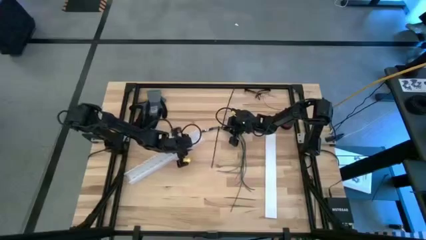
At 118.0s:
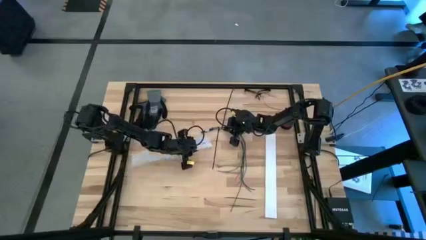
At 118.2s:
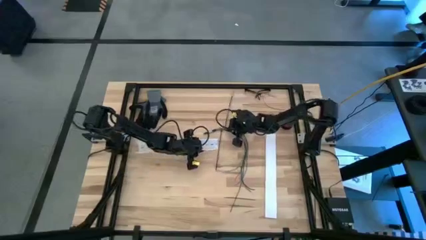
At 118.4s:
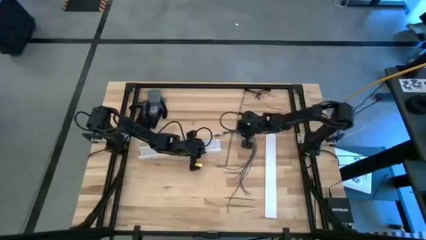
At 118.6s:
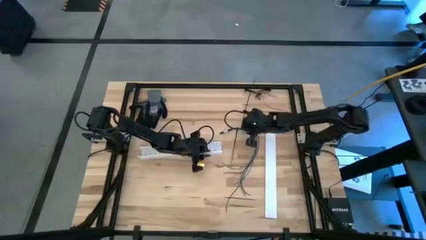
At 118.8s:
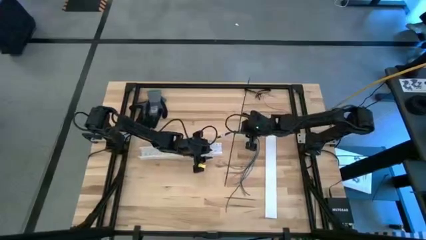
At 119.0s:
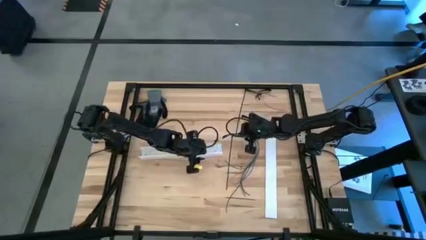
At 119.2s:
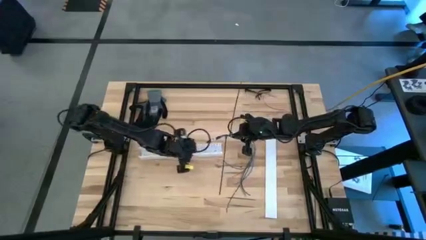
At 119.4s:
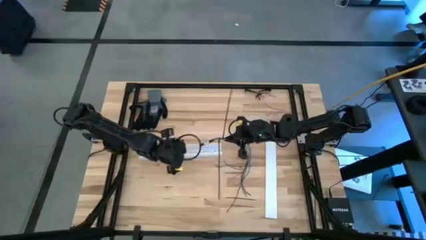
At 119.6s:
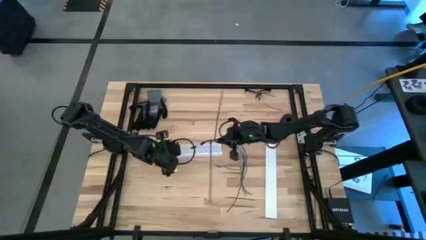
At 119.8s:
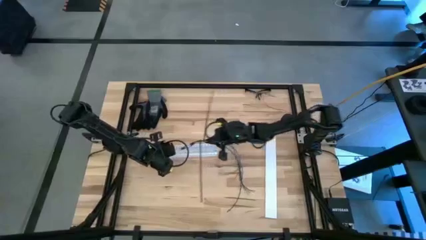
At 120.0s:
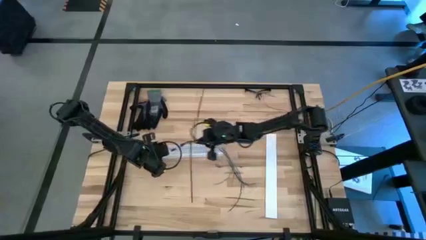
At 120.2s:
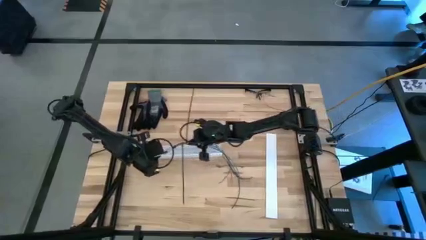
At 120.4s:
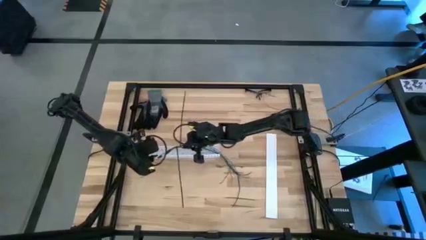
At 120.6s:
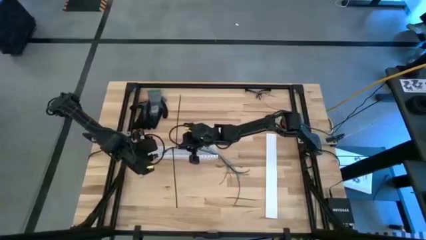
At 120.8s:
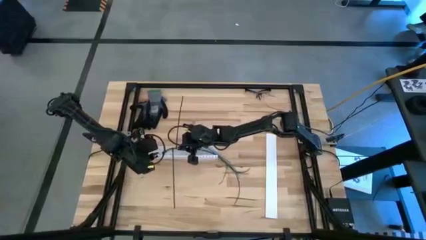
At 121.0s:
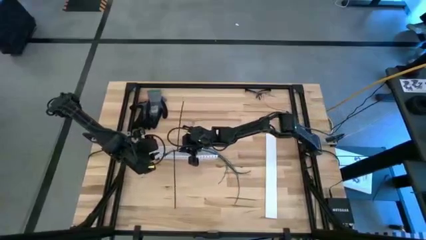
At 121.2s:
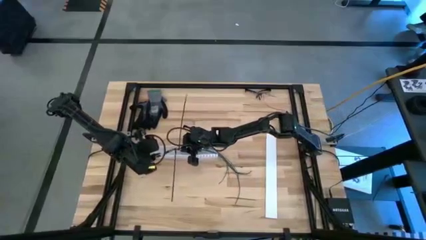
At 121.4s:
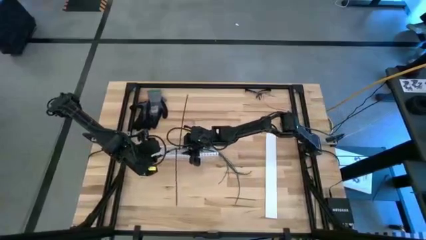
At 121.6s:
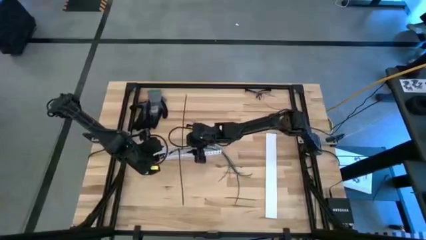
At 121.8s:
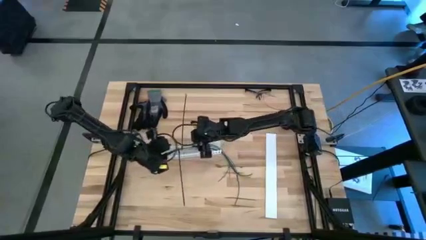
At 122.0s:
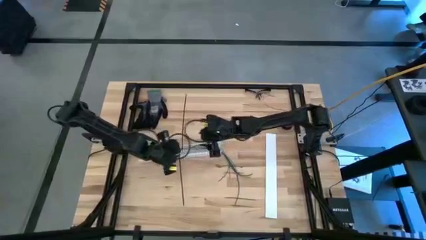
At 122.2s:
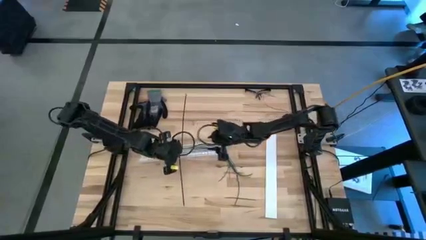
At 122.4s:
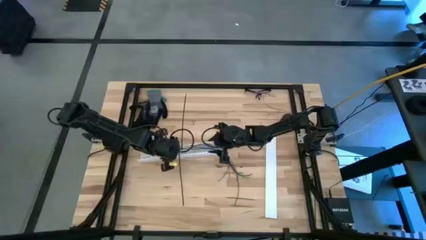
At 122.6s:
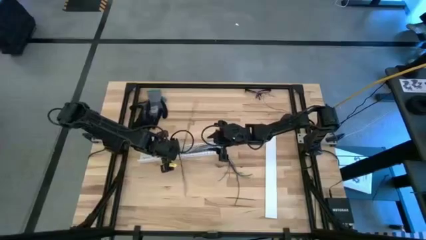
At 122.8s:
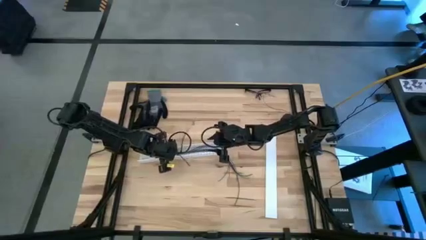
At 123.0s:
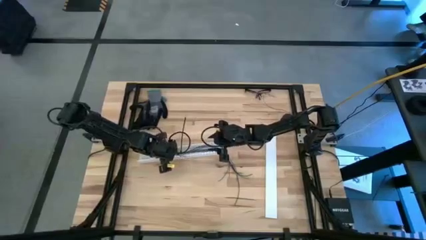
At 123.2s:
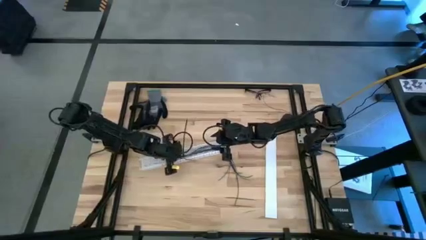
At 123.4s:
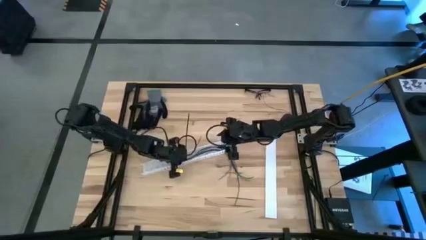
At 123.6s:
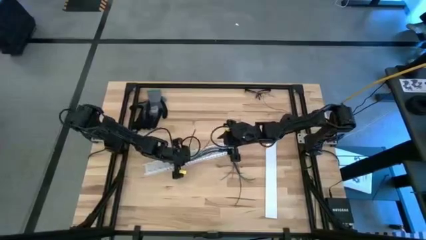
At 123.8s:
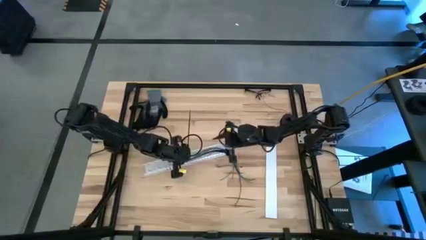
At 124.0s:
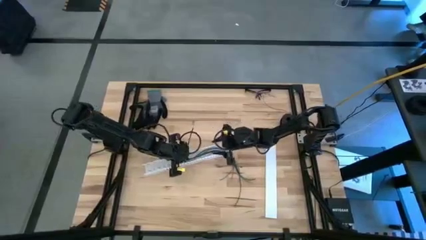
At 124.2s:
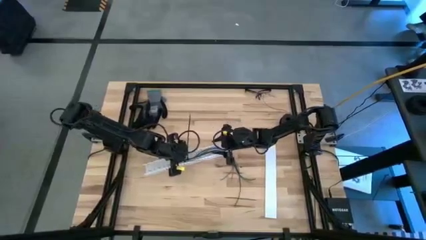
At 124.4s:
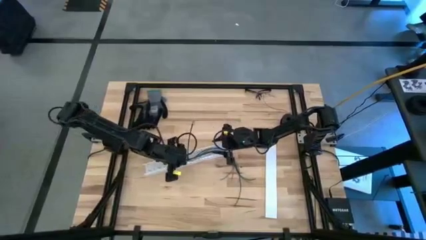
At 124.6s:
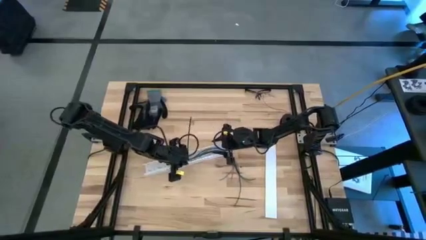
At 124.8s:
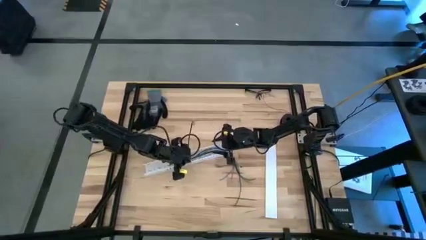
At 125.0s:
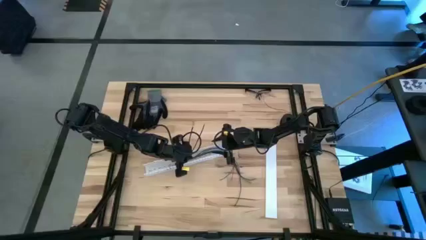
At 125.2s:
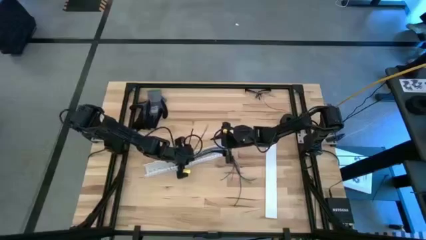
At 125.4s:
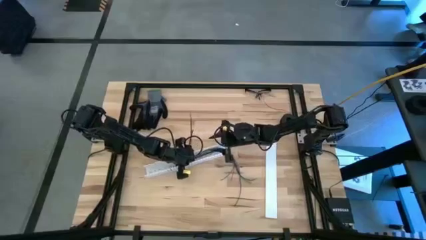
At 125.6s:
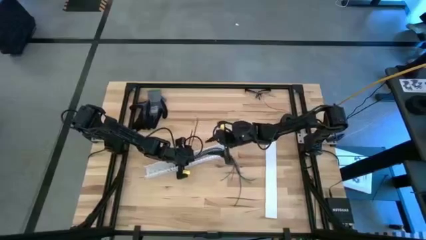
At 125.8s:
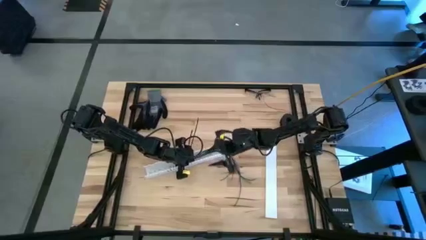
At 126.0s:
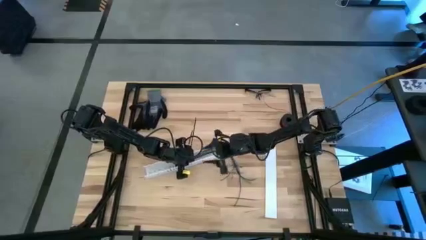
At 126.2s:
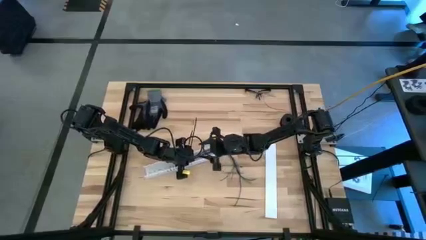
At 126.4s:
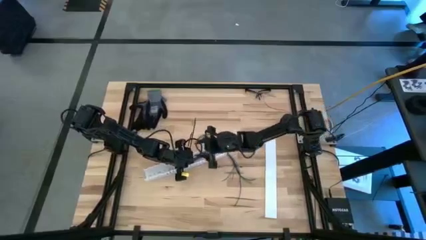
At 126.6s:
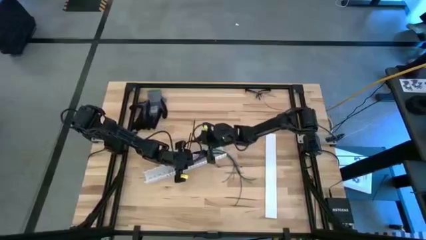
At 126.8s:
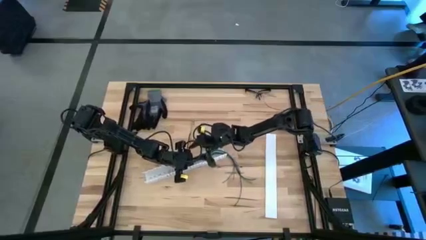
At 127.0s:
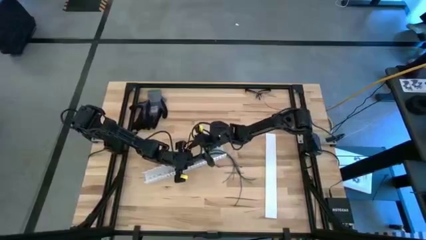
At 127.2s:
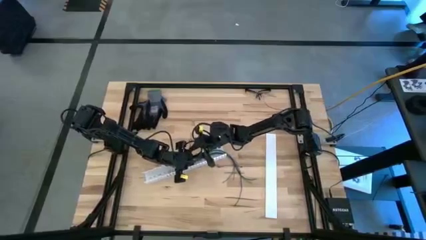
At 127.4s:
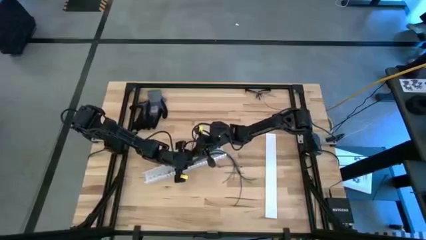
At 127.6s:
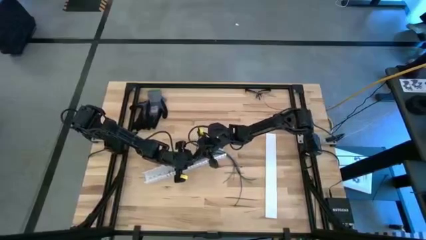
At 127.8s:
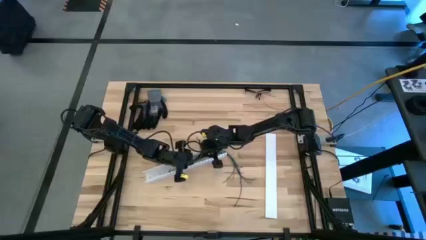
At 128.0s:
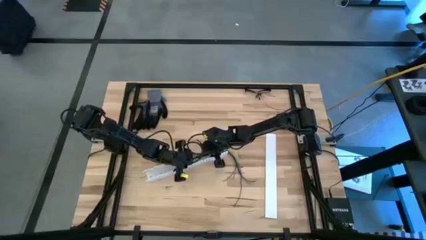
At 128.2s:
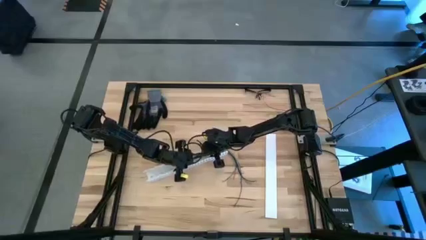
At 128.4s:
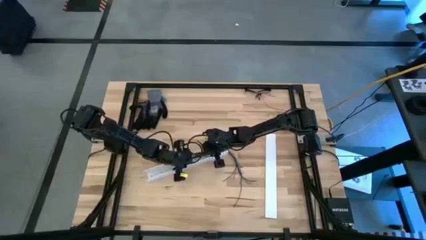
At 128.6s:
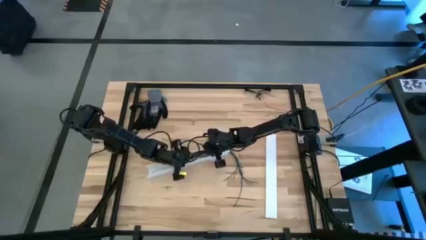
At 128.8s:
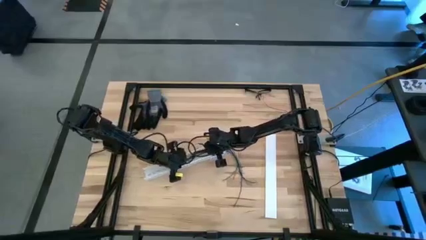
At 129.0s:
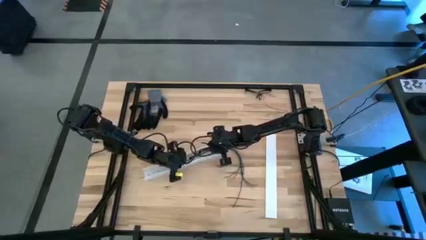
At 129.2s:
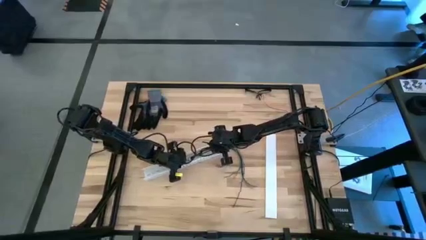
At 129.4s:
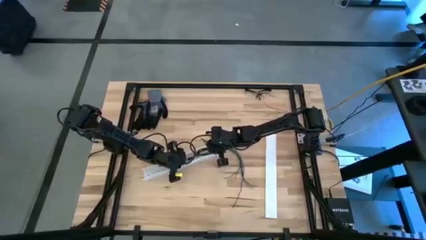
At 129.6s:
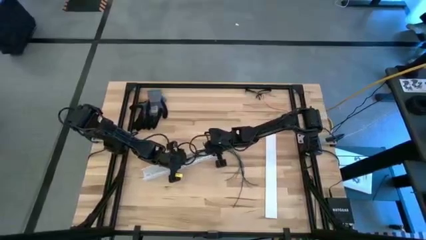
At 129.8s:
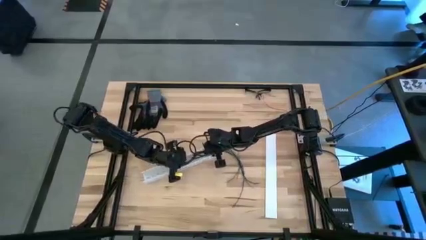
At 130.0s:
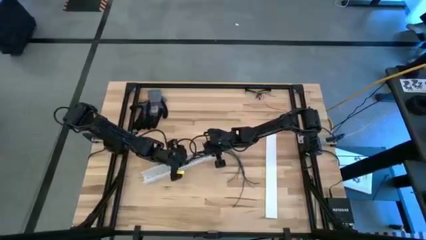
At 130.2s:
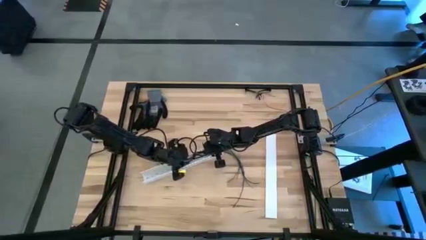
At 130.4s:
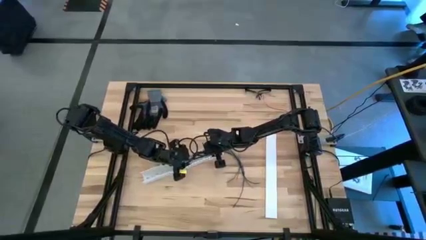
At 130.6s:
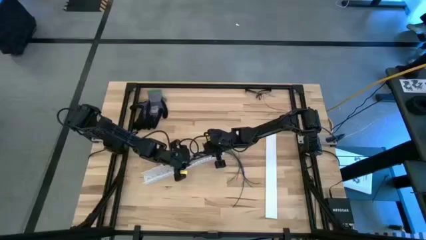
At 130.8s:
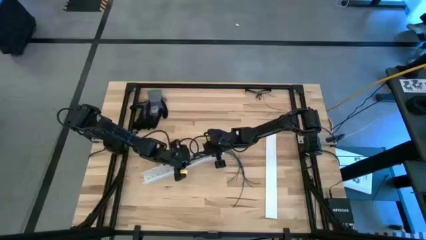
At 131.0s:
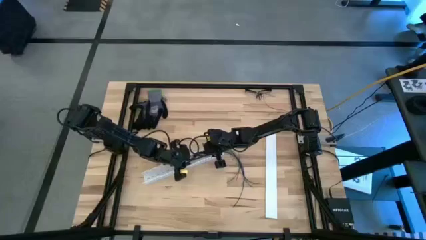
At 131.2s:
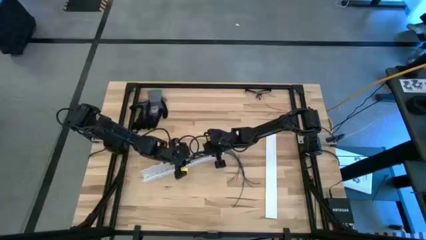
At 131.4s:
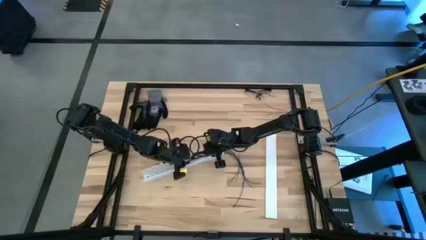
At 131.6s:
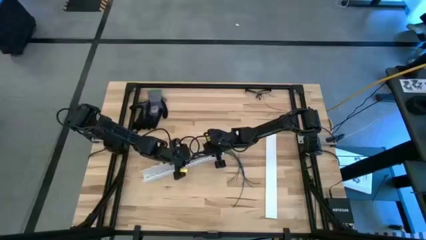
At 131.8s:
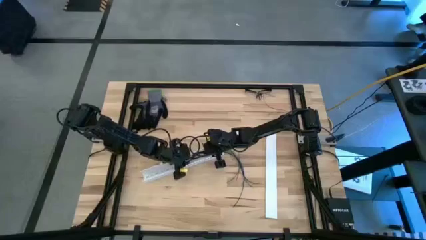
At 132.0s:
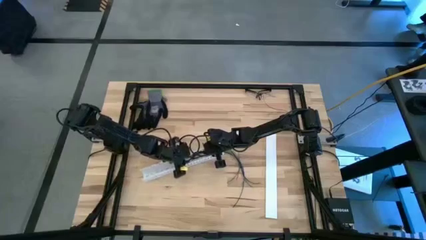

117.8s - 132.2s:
Task: Ziptie cables
Put the colored ziptied cables into the white cable duct

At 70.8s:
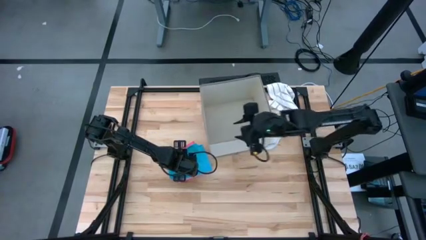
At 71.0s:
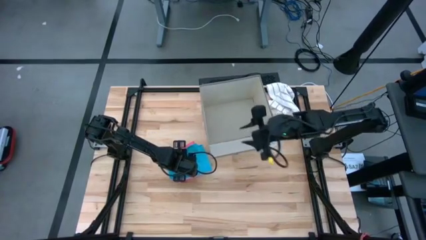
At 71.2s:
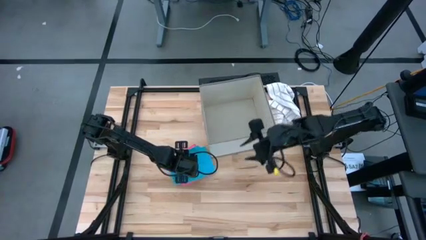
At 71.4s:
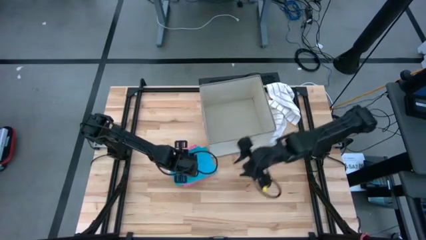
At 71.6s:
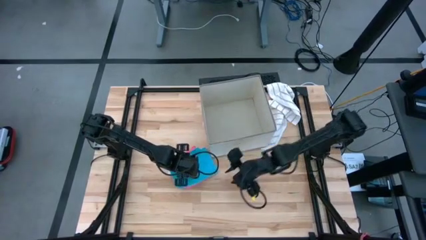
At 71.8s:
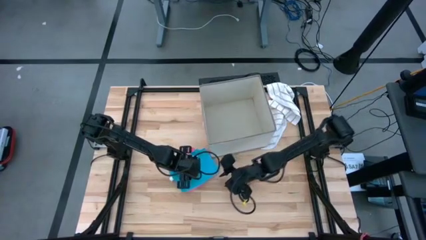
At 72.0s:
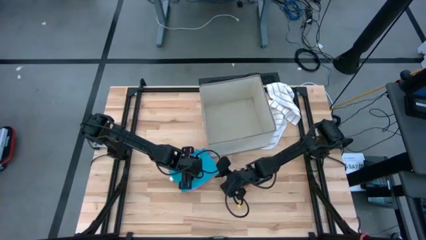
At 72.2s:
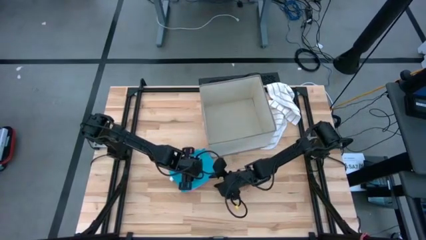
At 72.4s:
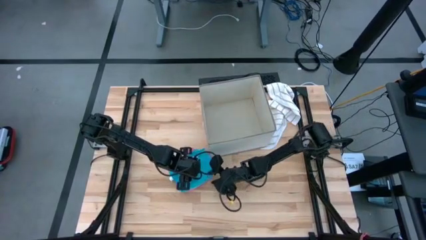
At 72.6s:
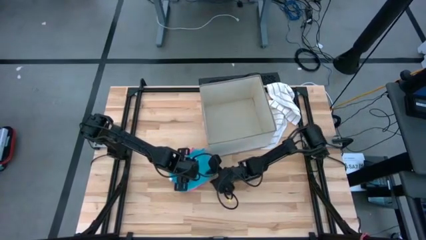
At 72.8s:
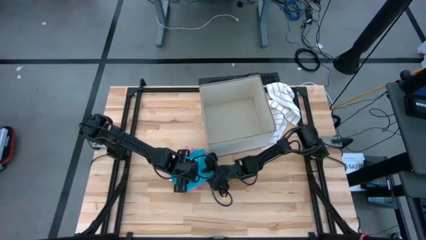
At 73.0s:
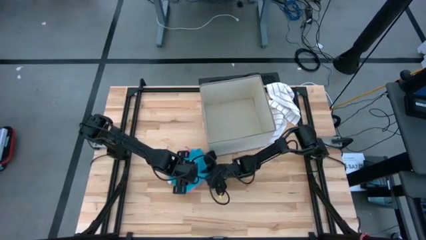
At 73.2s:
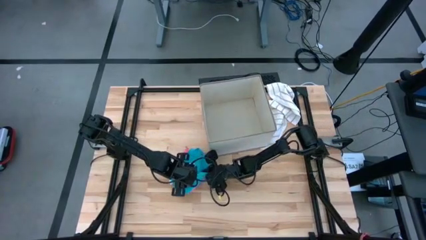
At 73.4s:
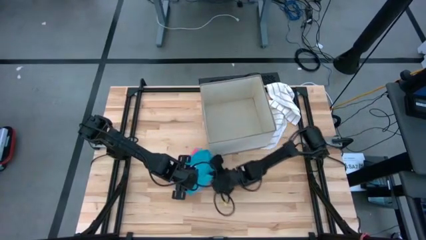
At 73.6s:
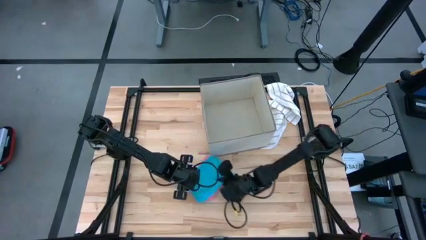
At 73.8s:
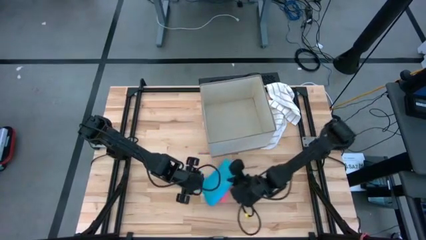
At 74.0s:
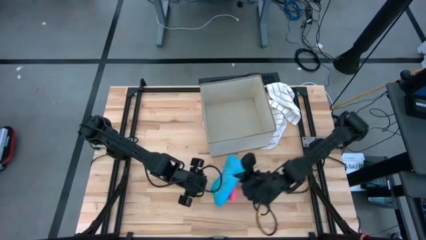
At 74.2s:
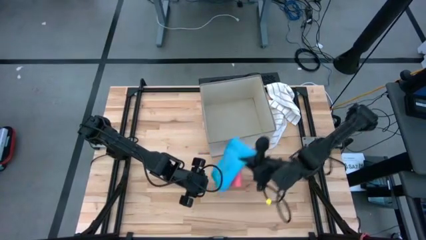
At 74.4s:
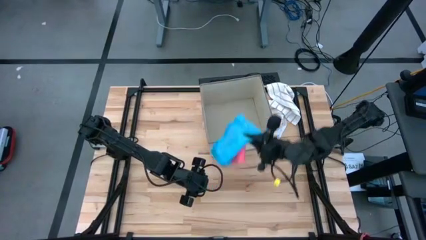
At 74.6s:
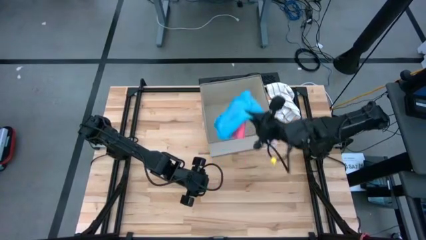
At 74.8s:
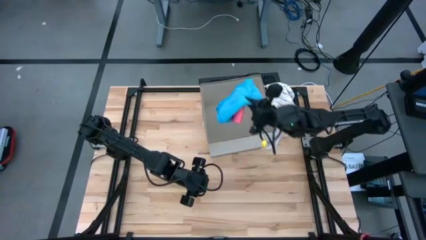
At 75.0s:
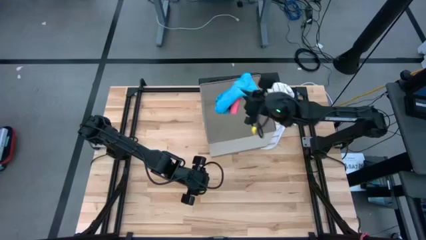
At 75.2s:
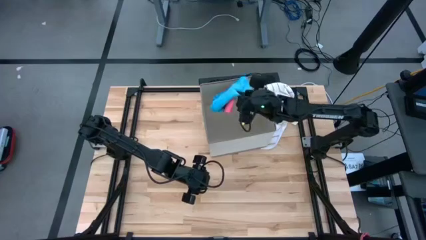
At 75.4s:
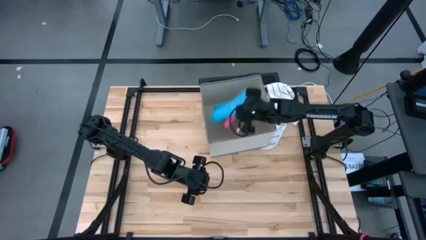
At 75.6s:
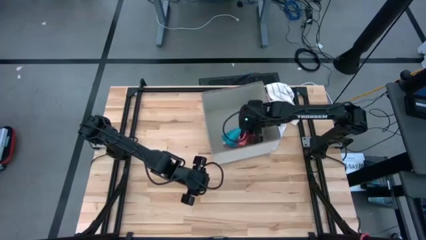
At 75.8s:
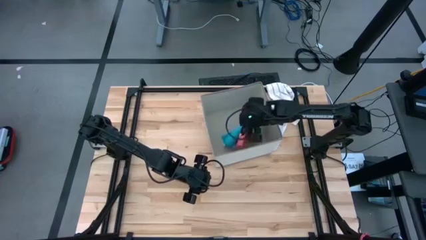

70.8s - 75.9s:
Task: Fold towel
Put the stacked microfiber towel into the laundry organizer
